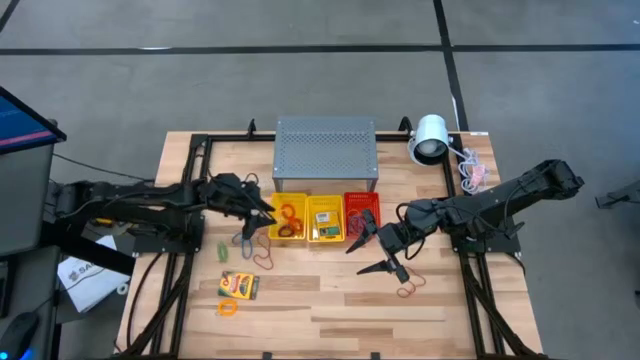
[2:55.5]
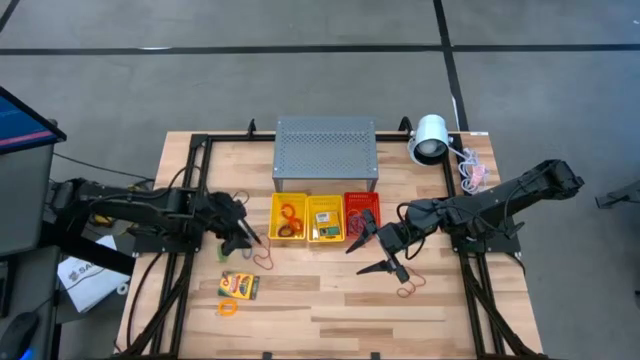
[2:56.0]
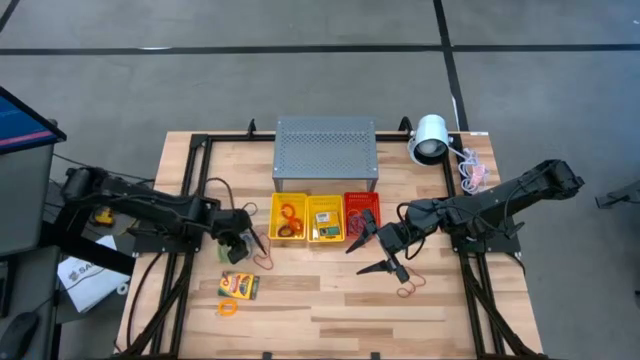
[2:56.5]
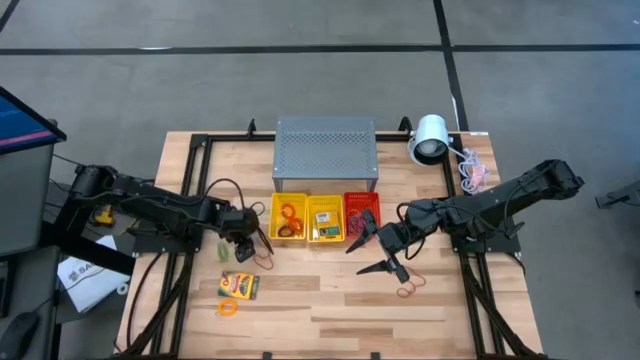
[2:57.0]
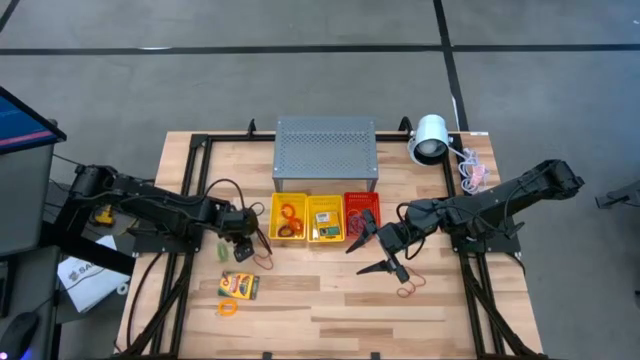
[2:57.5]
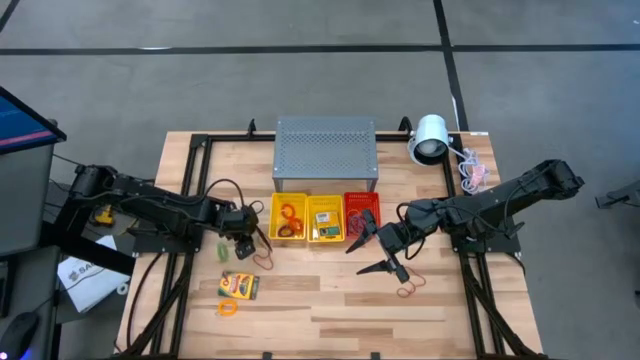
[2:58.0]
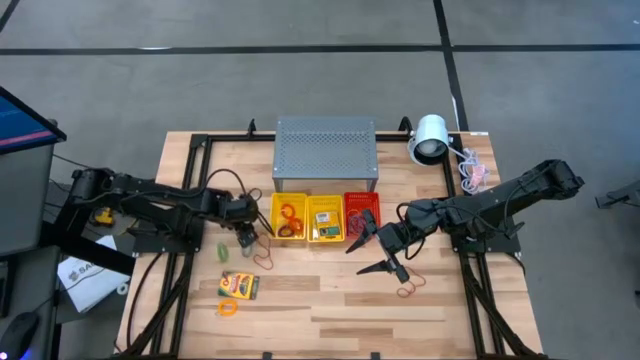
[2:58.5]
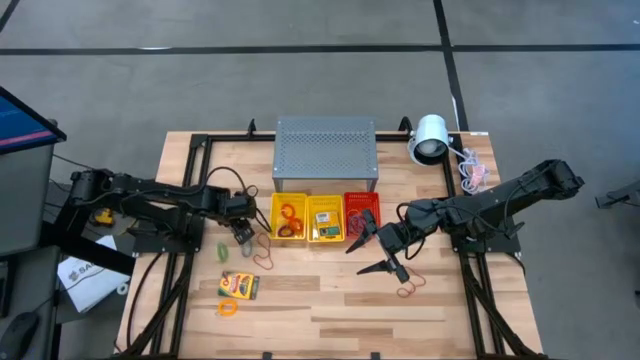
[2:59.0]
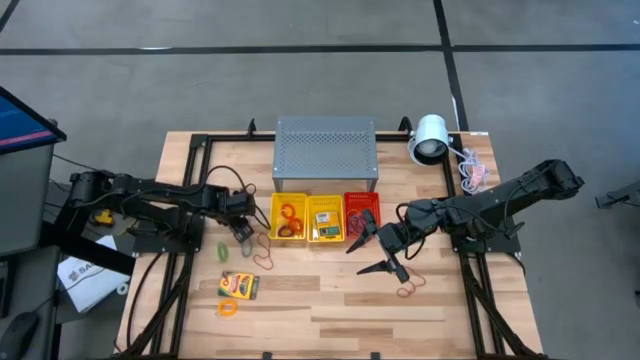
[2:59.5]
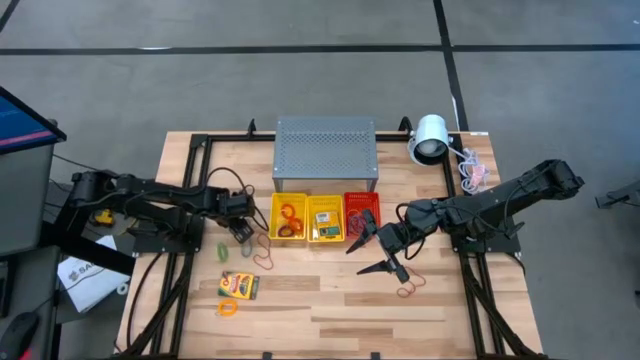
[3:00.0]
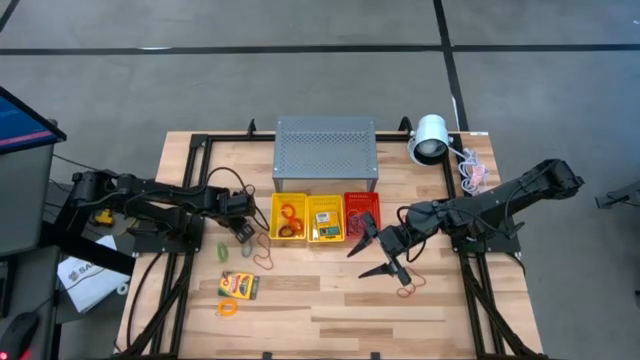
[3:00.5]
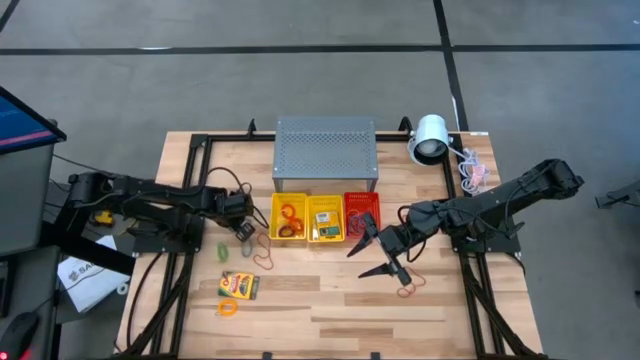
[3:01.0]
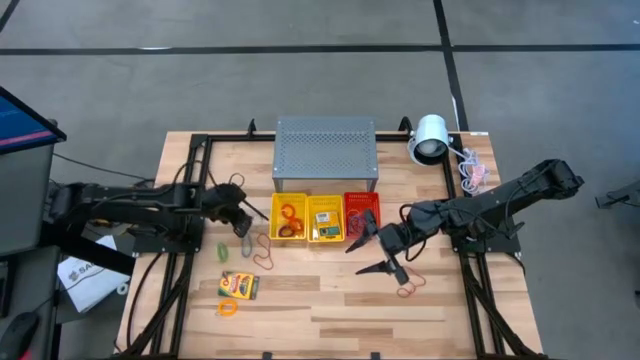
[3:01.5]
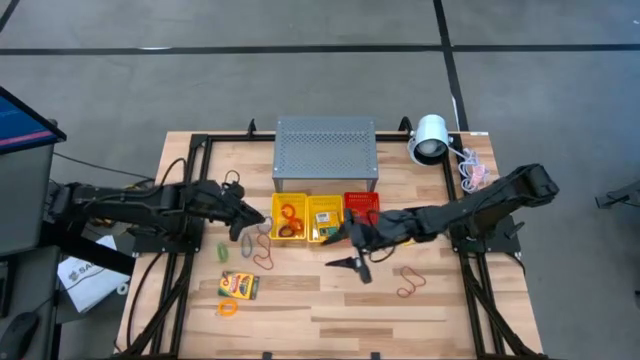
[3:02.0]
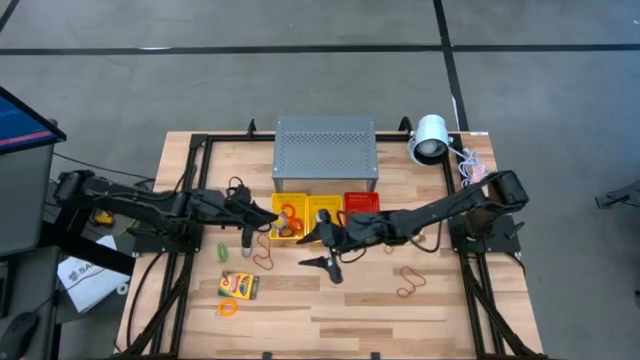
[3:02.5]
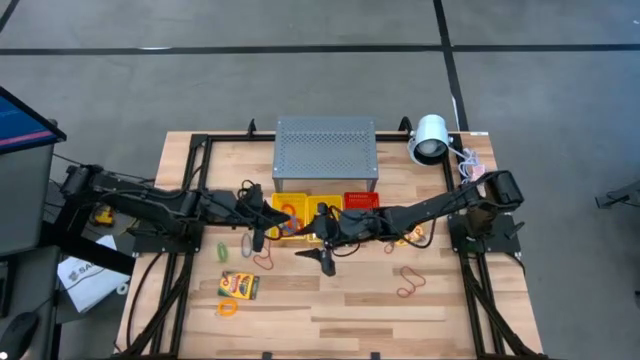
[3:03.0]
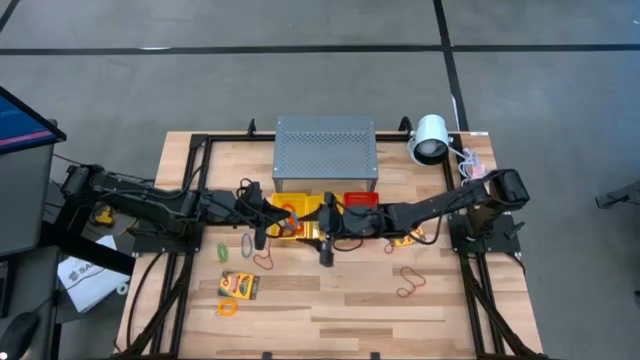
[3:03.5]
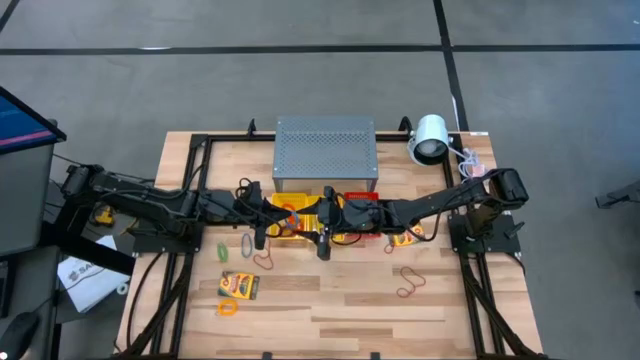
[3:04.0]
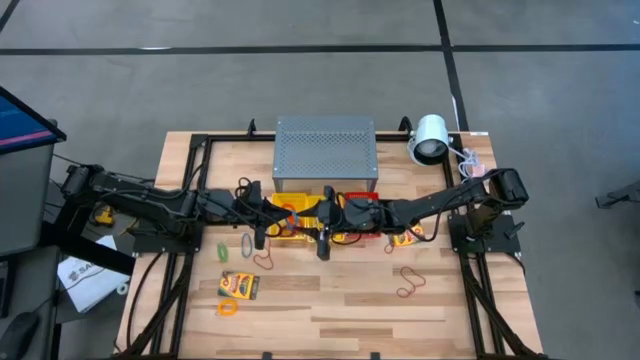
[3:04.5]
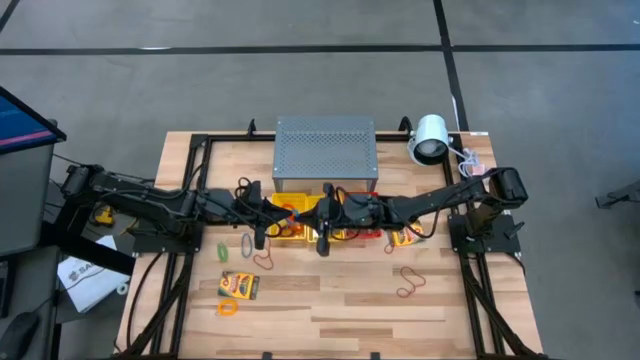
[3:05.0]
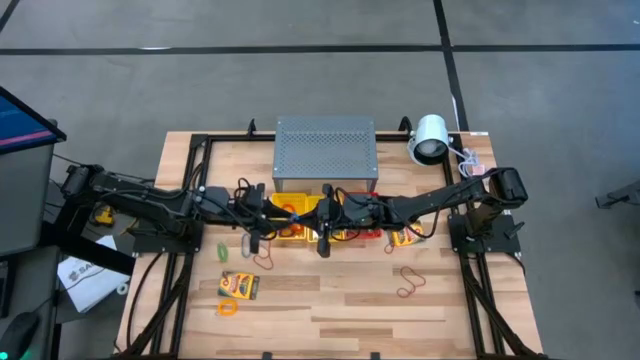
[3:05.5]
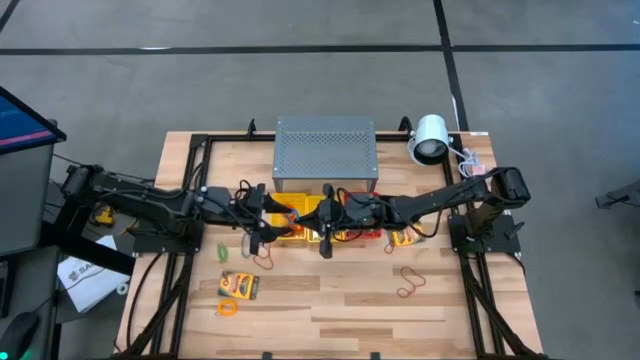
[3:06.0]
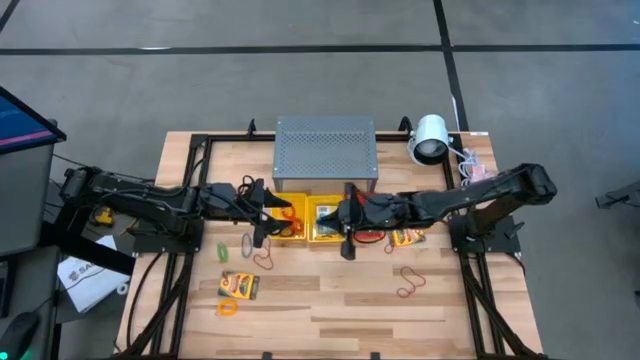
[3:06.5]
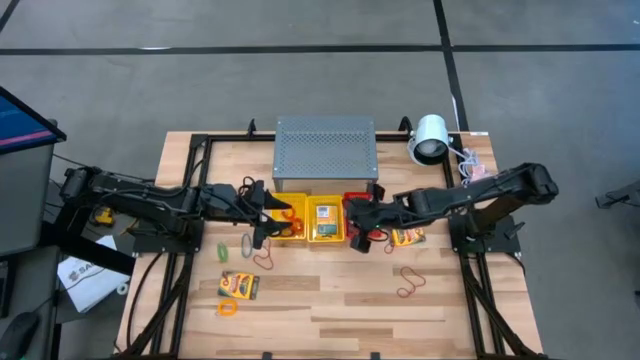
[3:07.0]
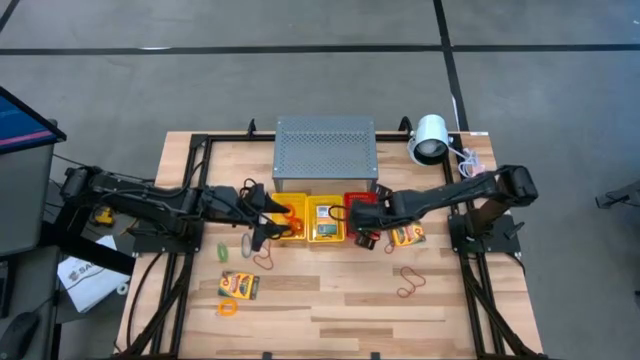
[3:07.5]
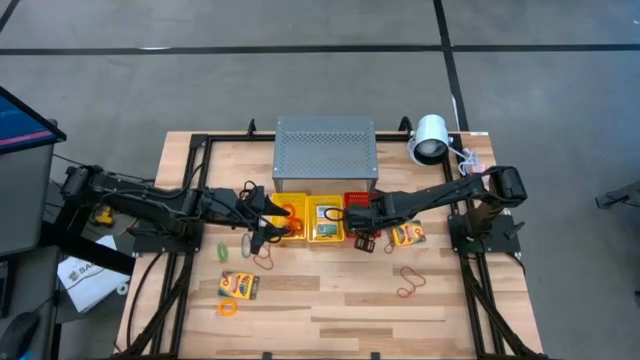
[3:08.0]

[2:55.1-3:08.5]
Task: Pick & Place Office Desk Supplies
Put the blue rubber band into the red bin

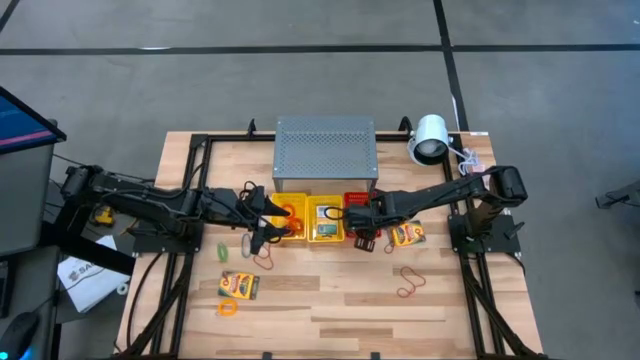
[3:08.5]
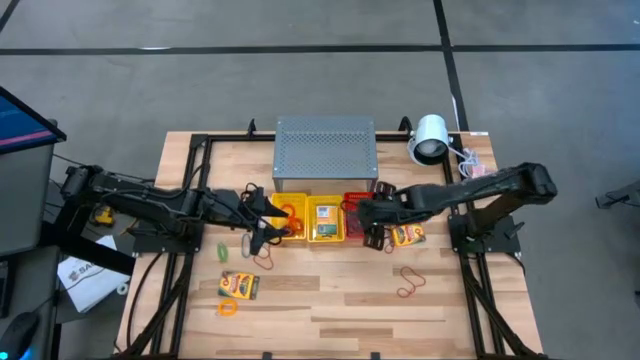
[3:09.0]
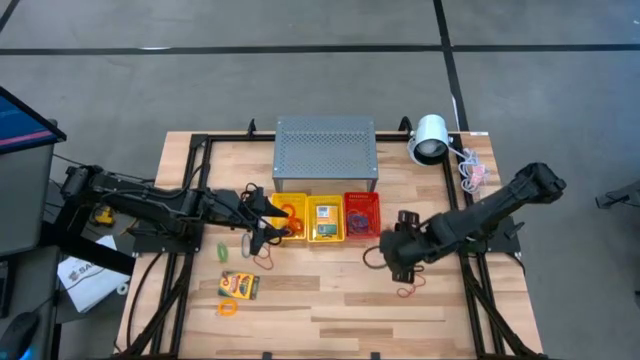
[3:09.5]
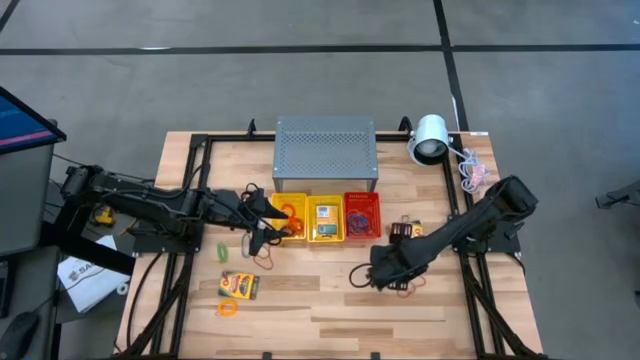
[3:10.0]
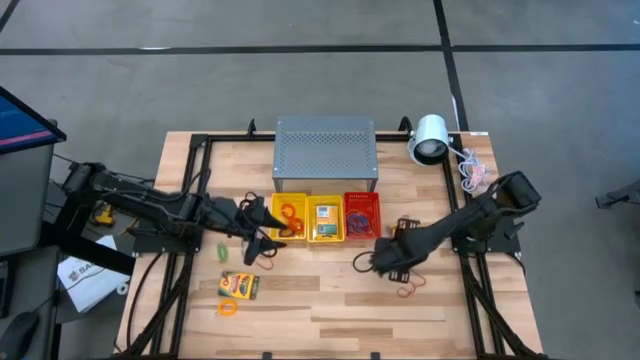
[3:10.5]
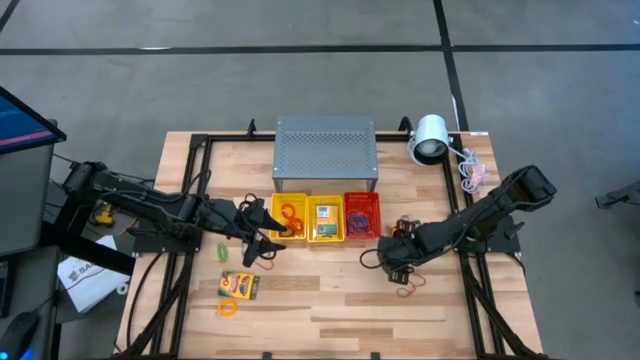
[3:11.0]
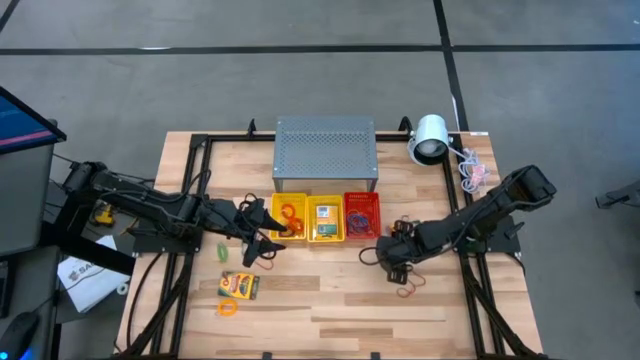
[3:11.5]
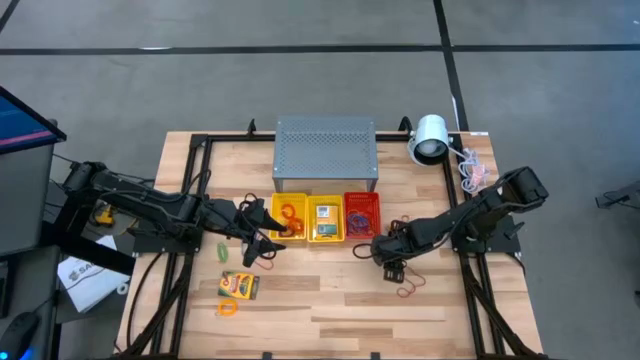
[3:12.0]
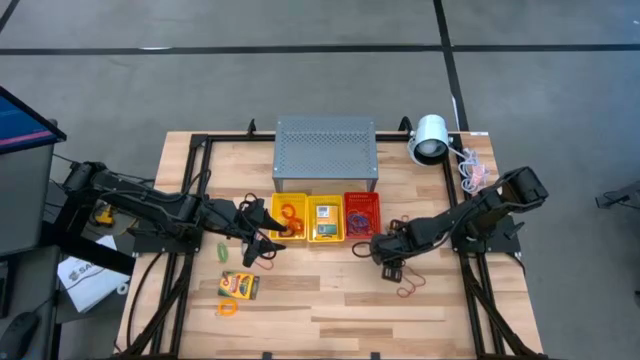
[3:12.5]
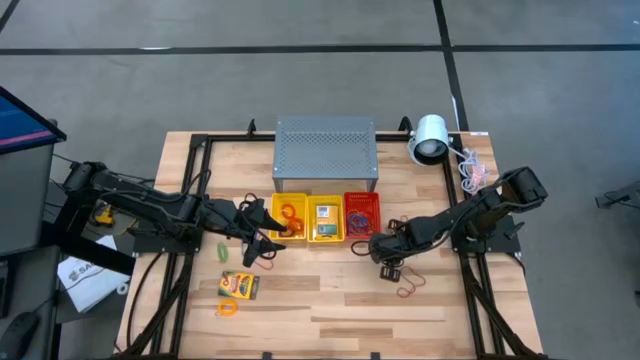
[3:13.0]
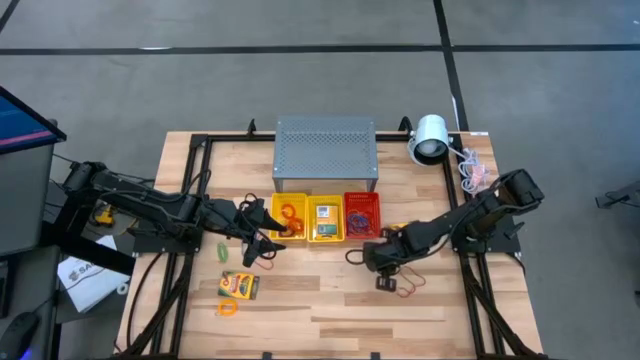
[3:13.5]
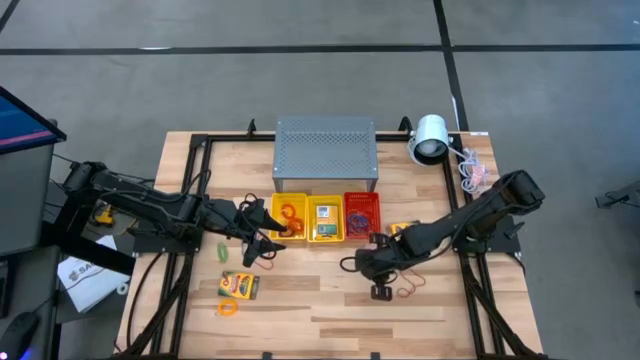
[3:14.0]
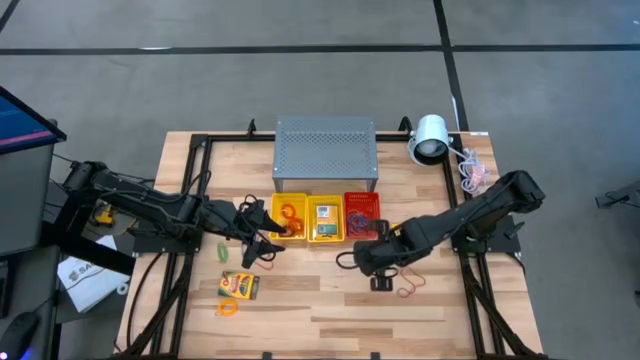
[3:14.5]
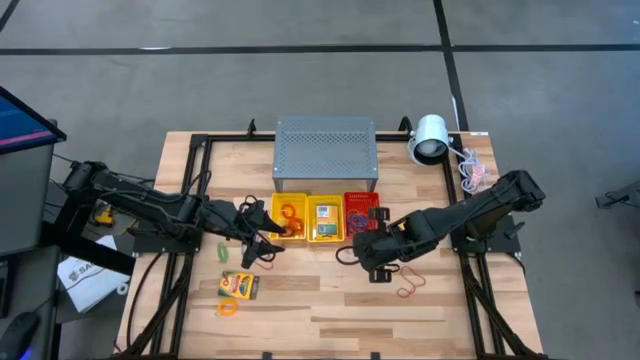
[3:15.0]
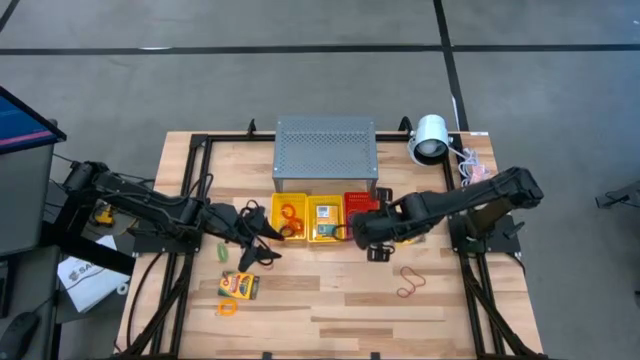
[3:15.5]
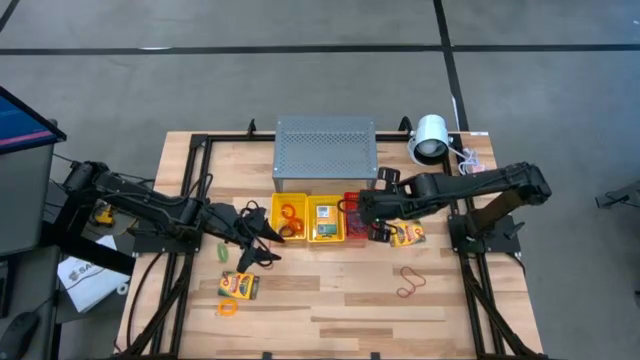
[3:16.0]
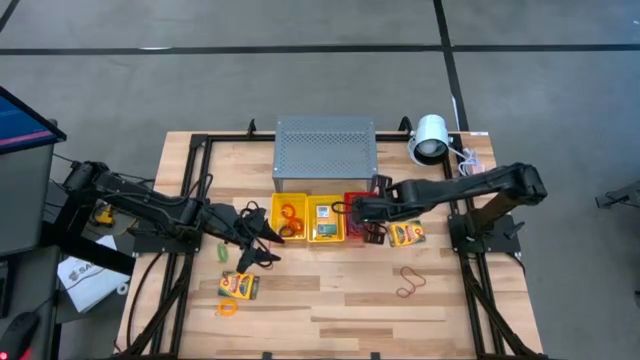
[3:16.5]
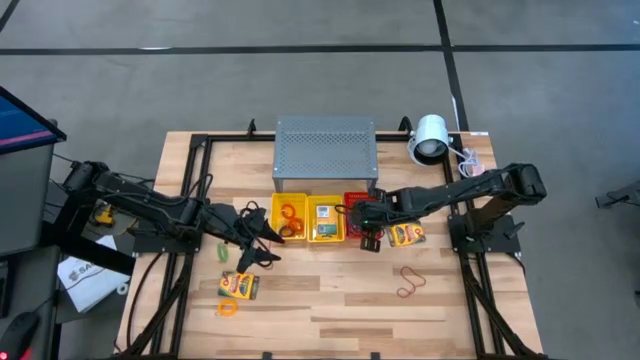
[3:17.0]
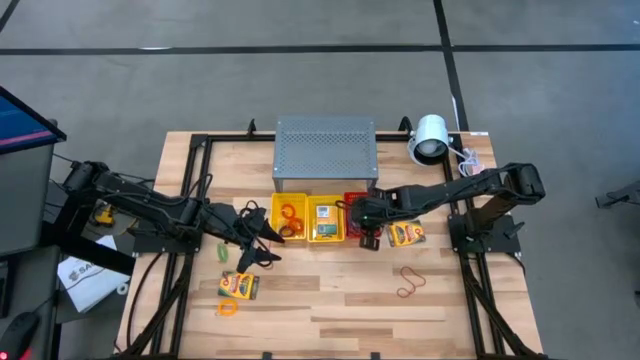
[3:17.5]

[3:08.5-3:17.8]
Put the red rubber band into the red bin
